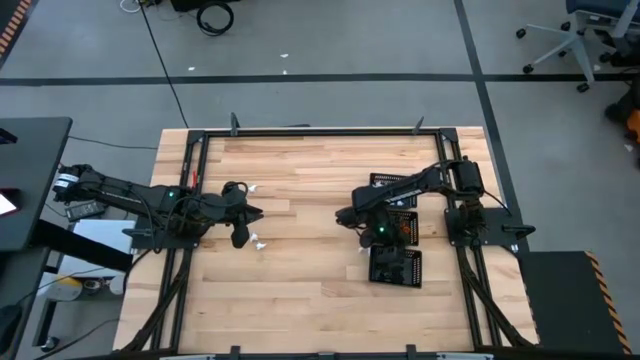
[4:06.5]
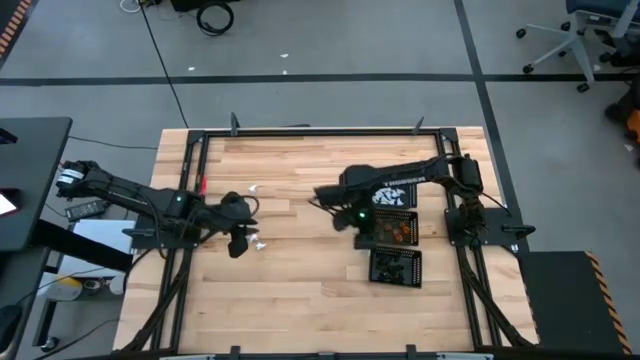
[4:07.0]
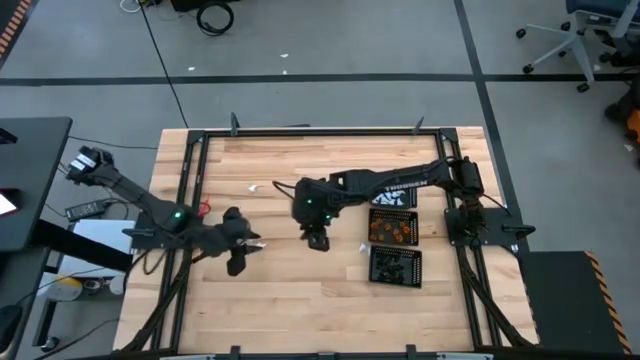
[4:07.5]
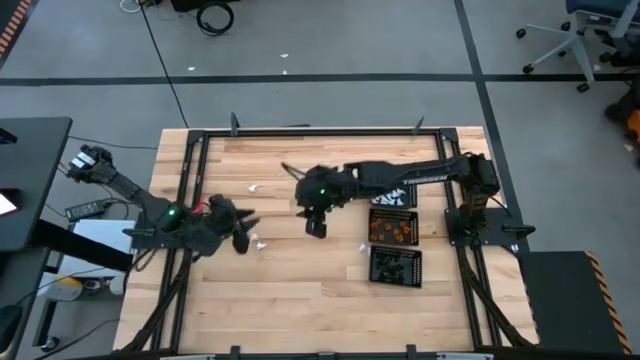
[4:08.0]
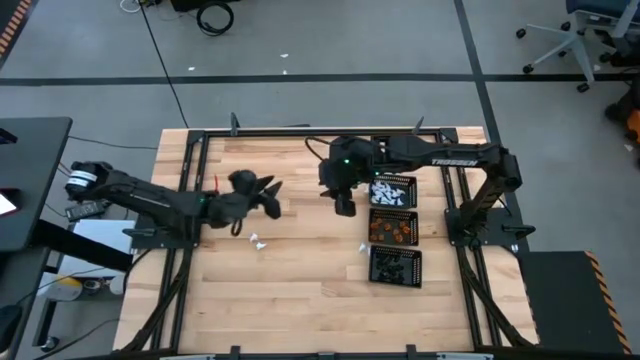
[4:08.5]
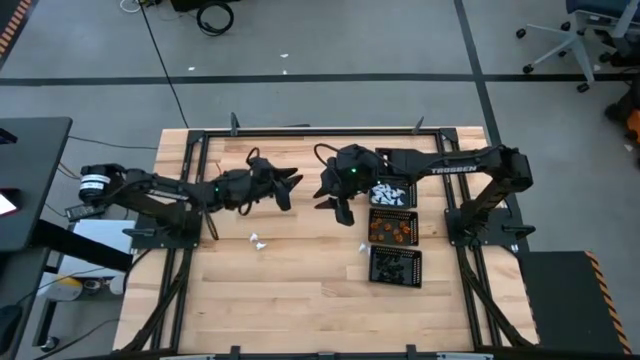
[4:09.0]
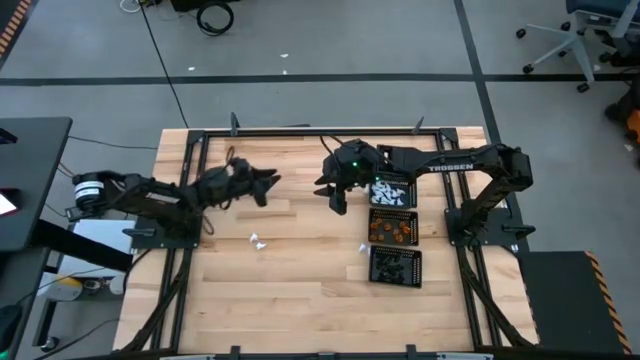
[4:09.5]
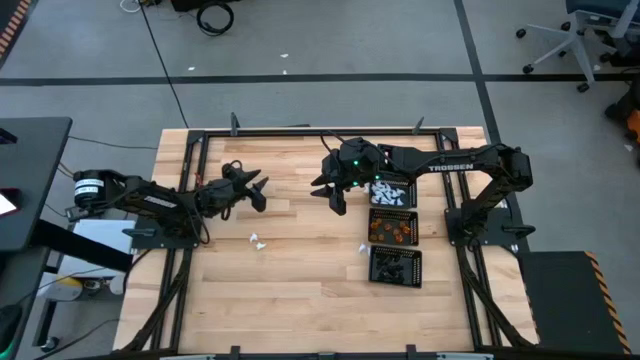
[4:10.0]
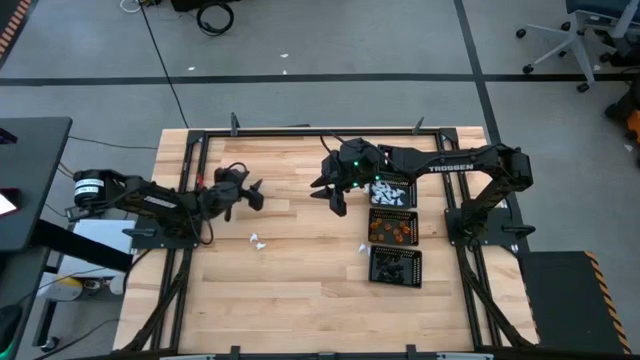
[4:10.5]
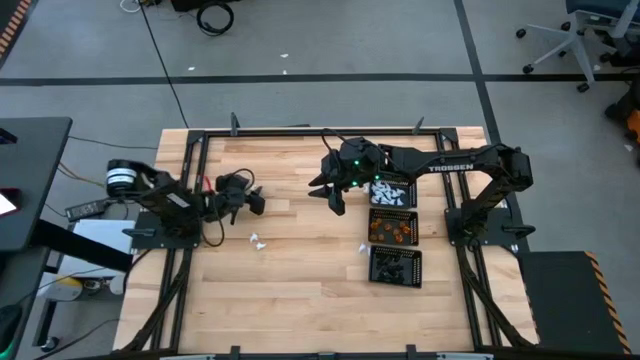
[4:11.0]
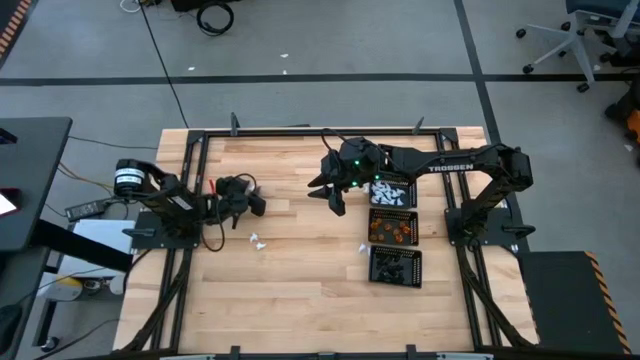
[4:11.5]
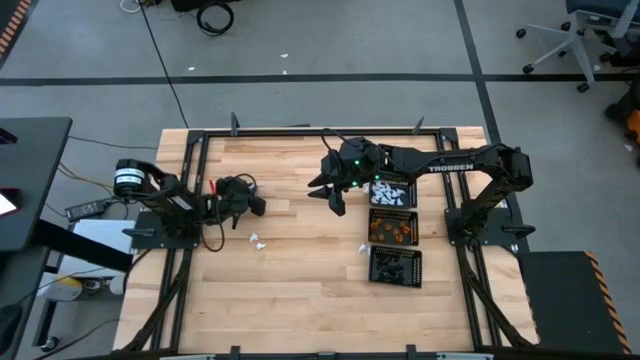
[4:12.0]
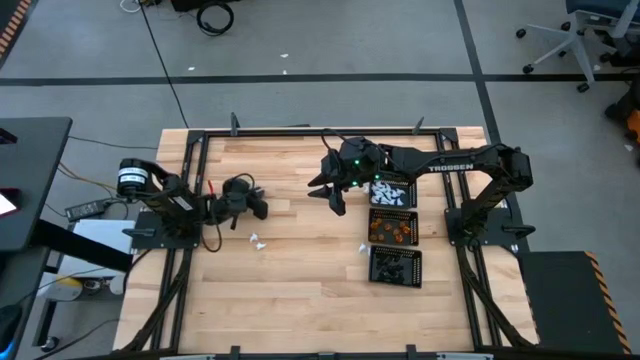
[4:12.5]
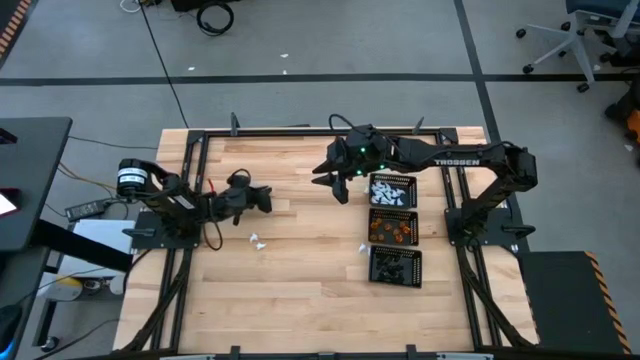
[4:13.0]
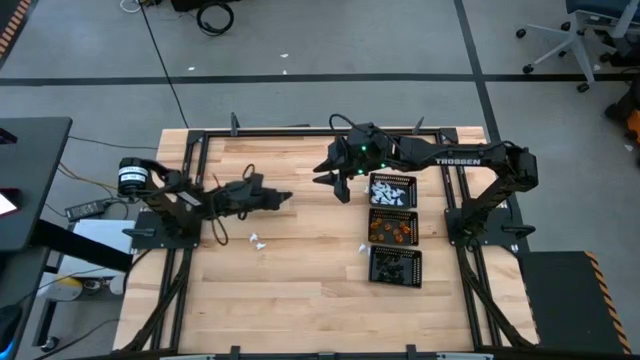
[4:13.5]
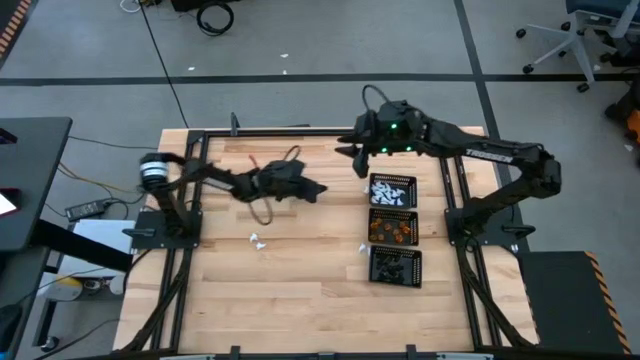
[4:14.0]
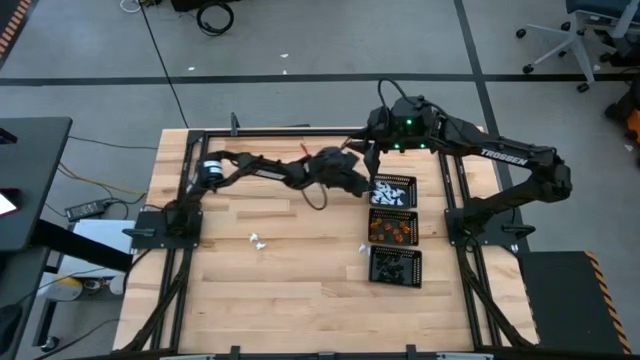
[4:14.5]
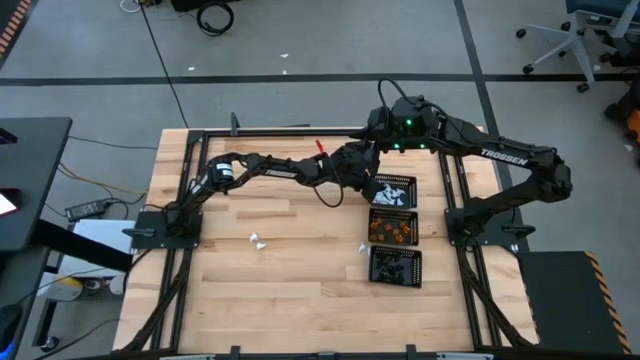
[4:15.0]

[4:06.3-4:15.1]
Task: Sort Halloween decoration
Put the white ghost toy into the top black bin

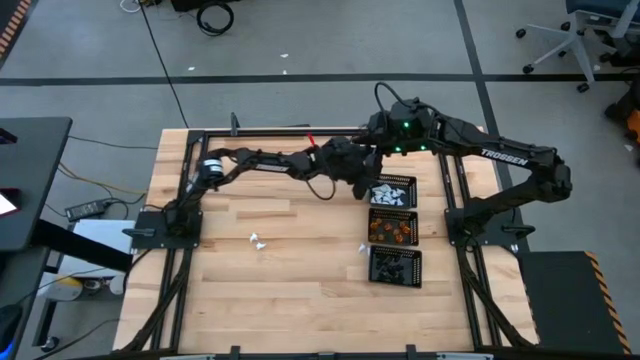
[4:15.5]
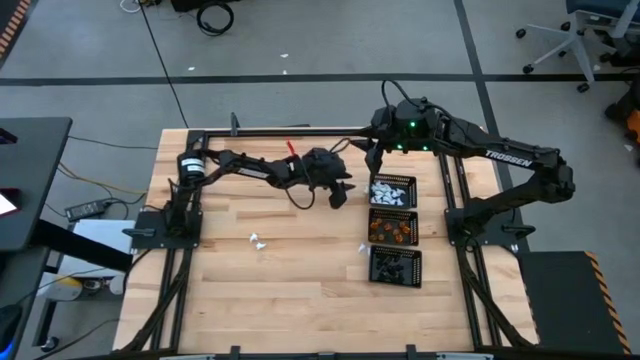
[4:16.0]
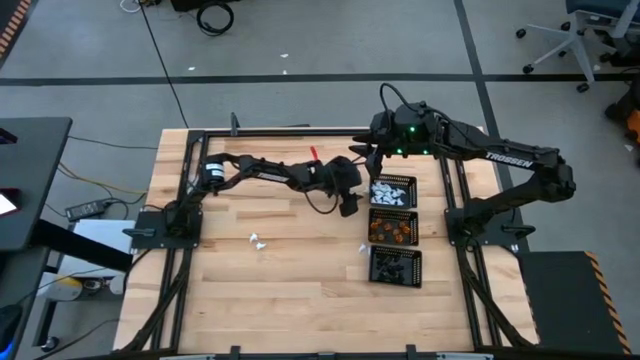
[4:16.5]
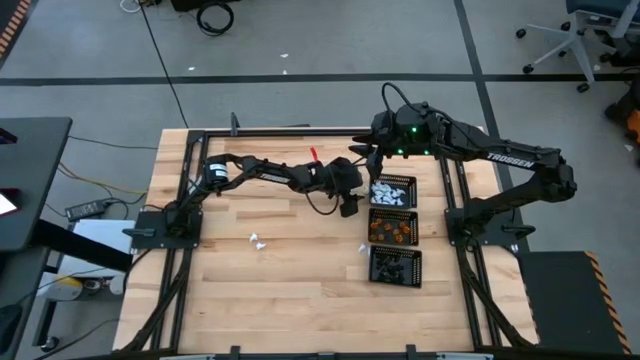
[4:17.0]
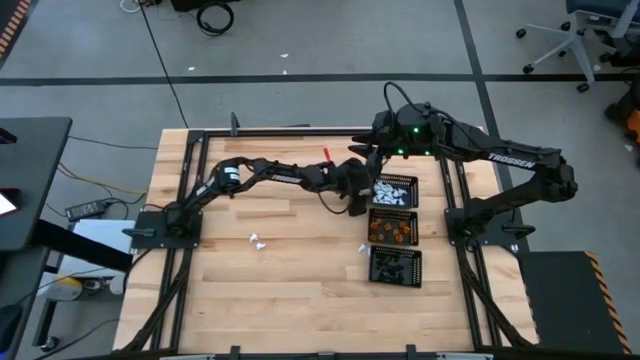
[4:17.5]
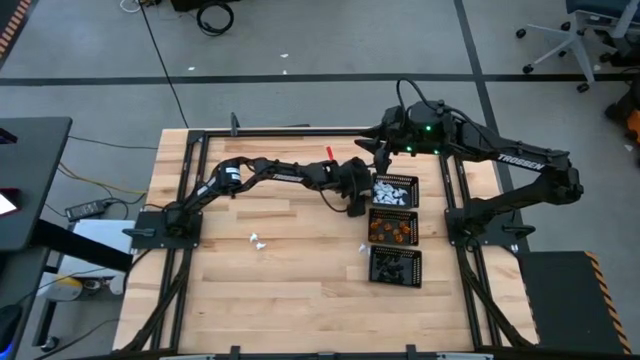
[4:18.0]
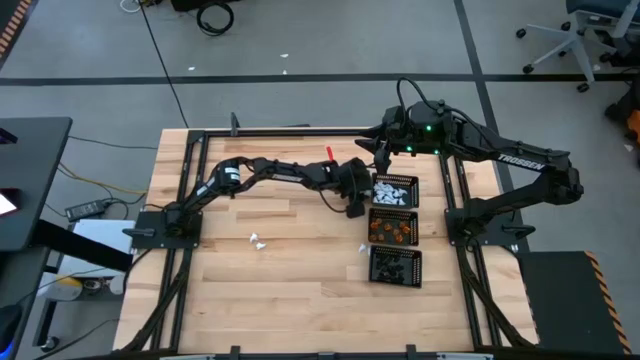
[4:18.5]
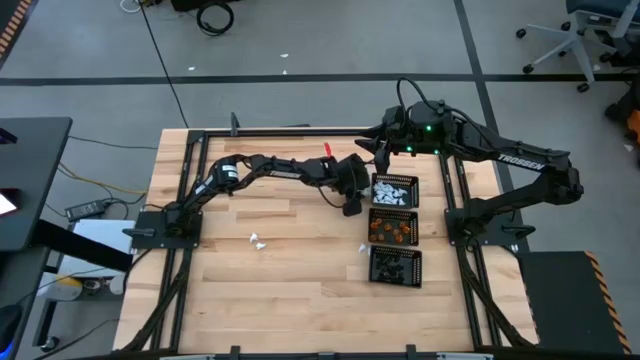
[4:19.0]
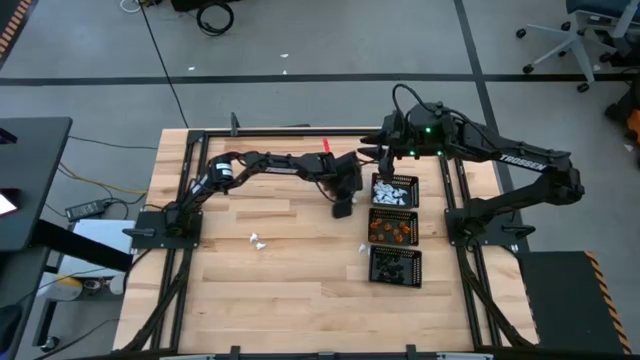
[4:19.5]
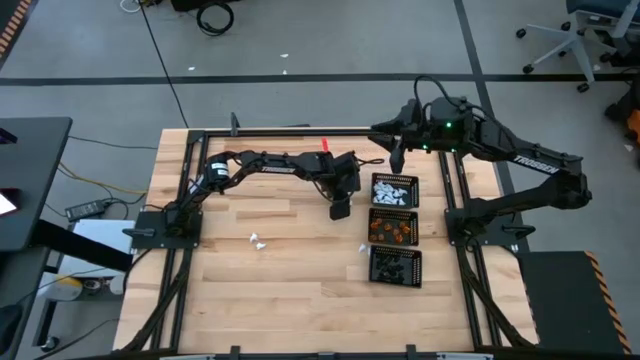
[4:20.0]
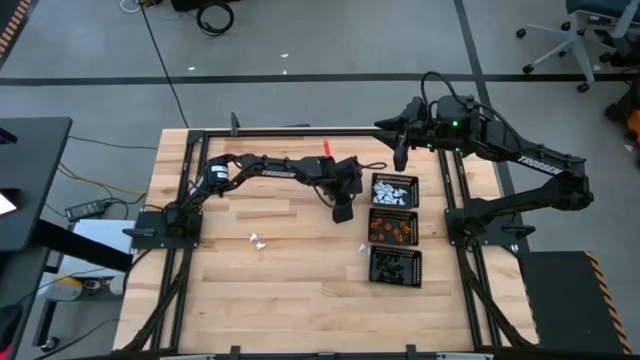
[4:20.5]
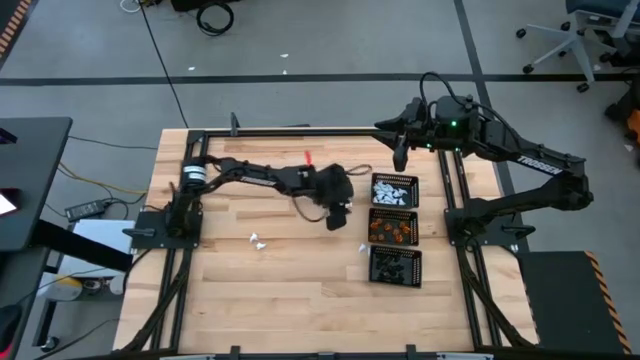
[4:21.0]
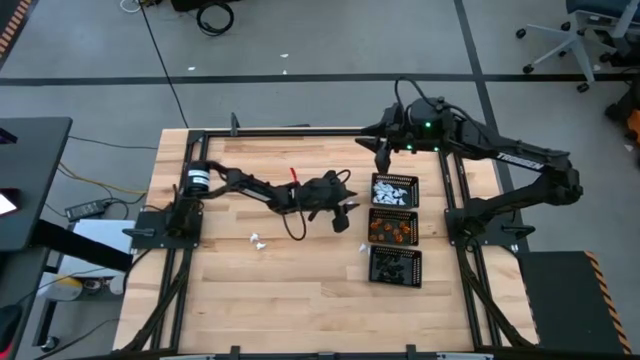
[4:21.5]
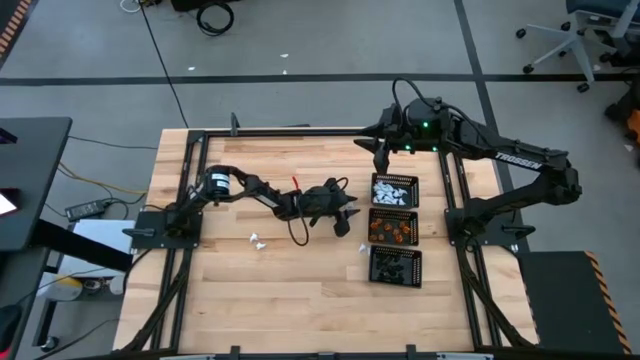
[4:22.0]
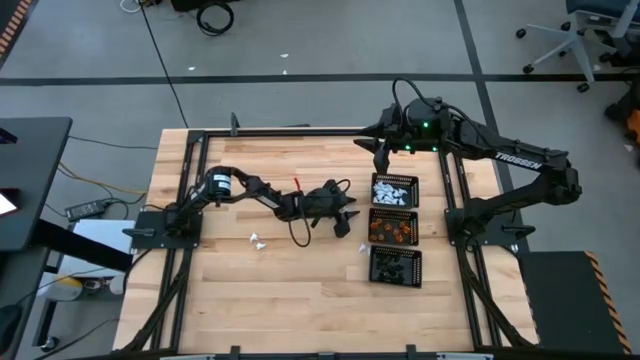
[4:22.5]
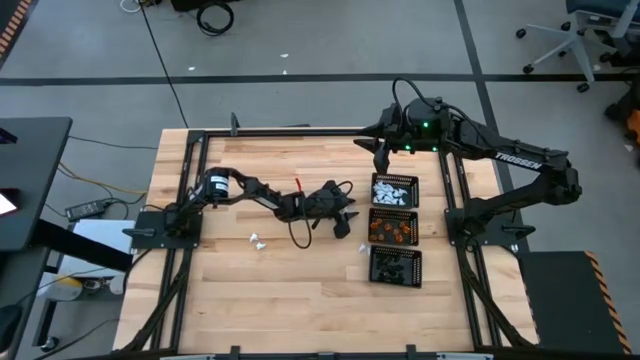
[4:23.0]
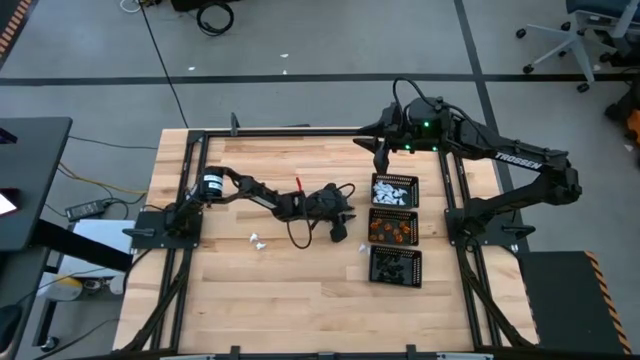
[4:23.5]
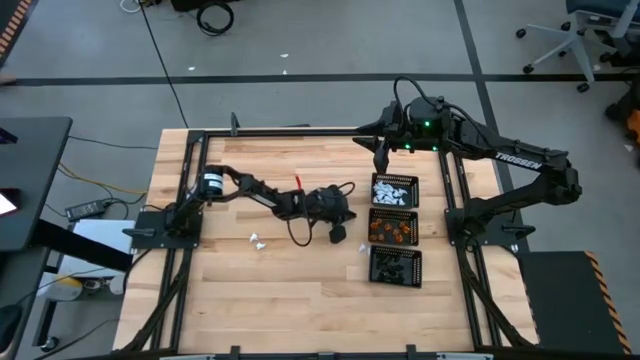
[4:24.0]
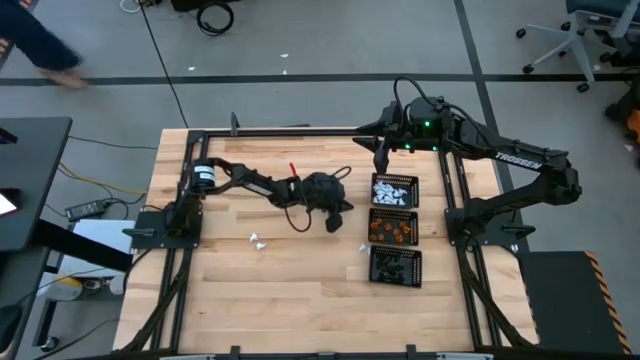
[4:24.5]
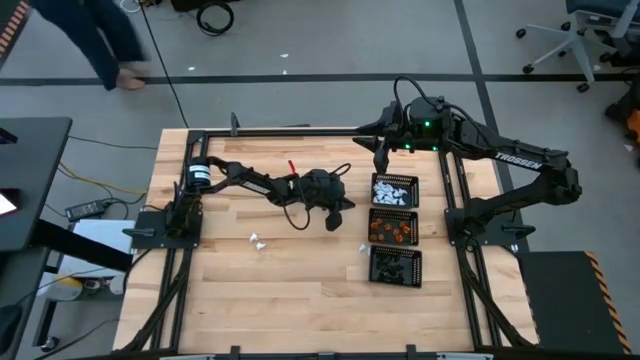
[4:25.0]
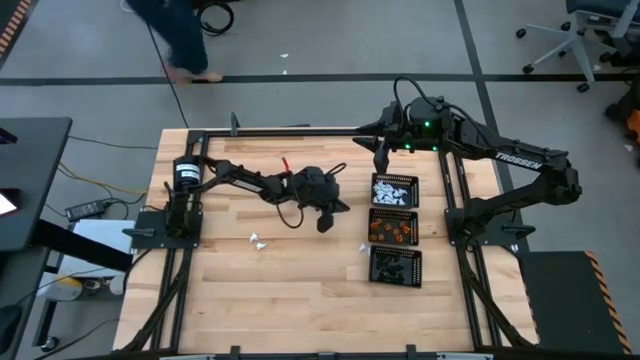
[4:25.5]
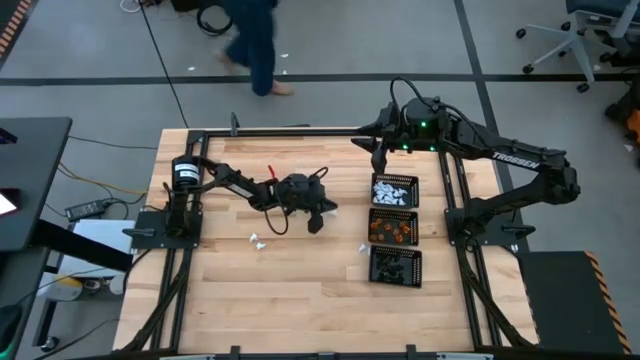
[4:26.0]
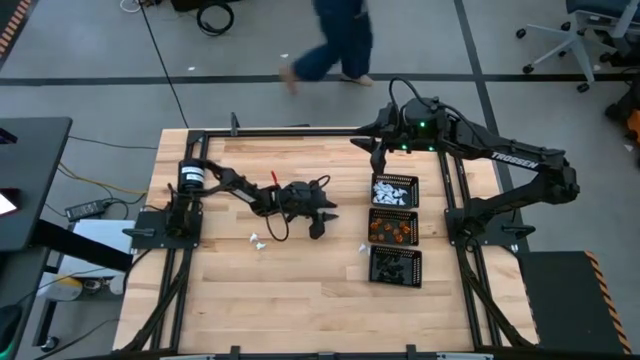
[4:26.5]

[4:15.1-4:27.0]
Put the white ghost toy into the top black bin

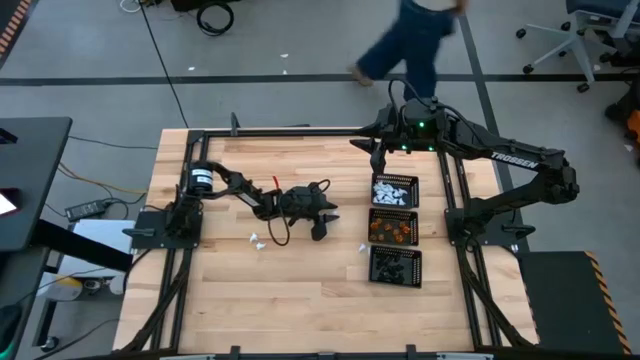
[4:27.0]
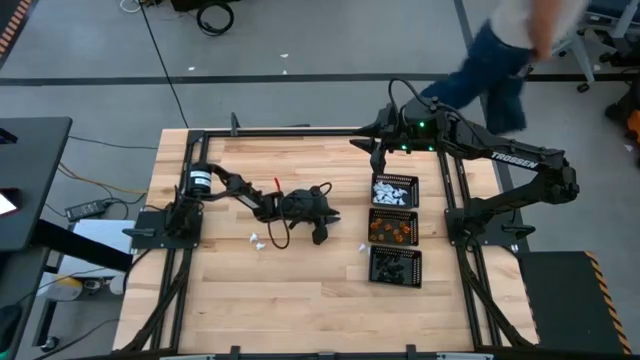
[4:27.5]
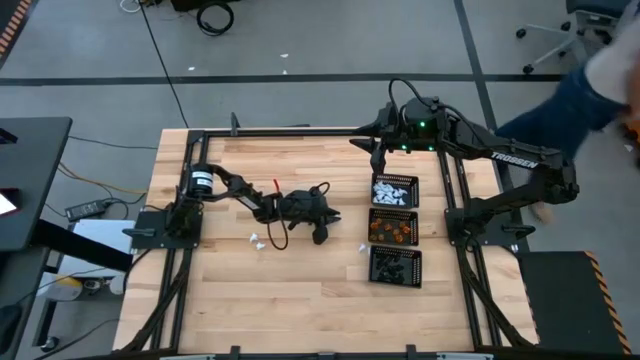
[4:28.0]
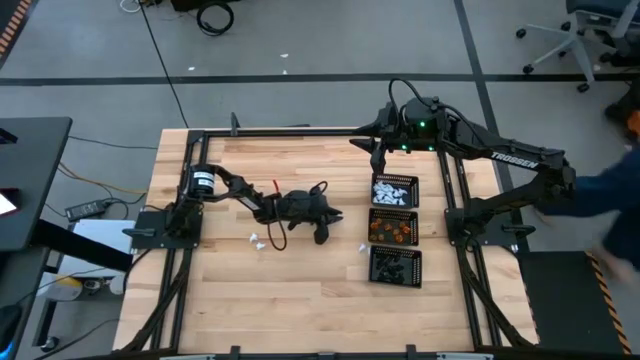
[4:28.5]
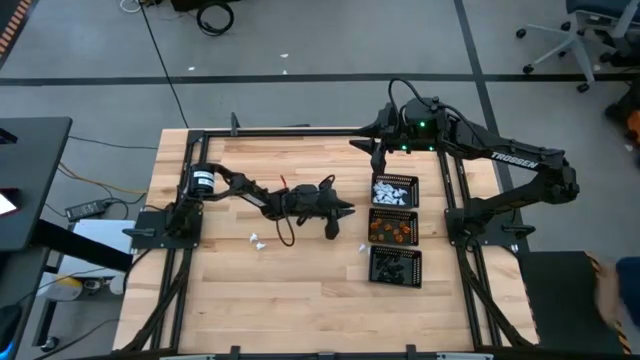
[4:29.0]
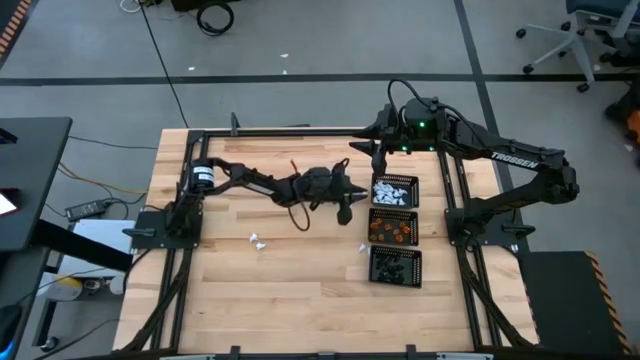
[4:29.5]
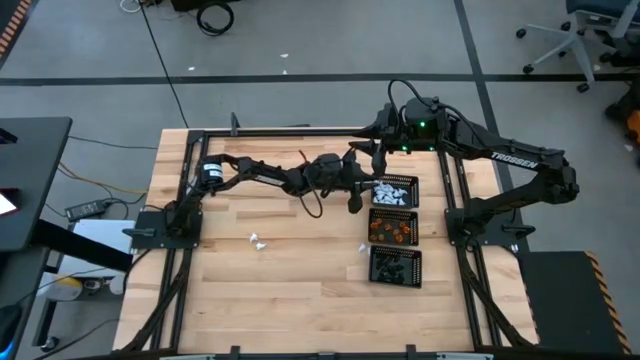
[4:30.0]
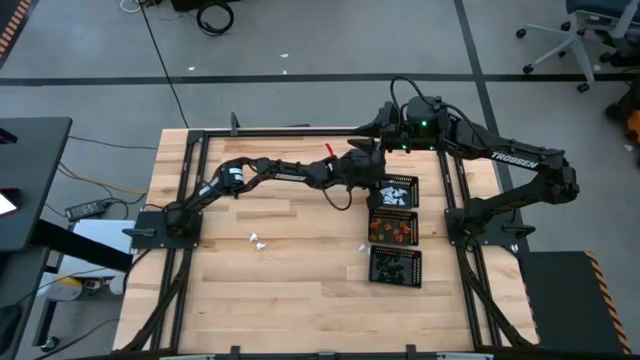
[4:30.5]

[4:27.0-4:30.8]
Put the white ghost toy into the top black bin
